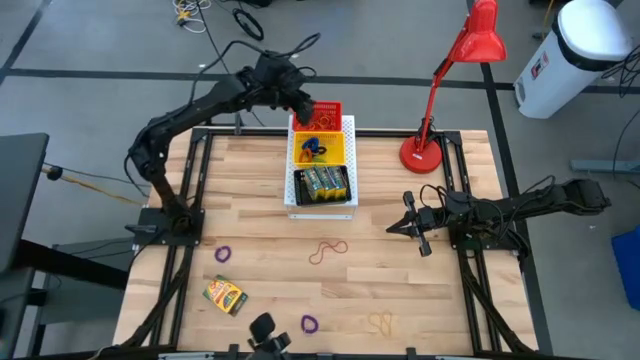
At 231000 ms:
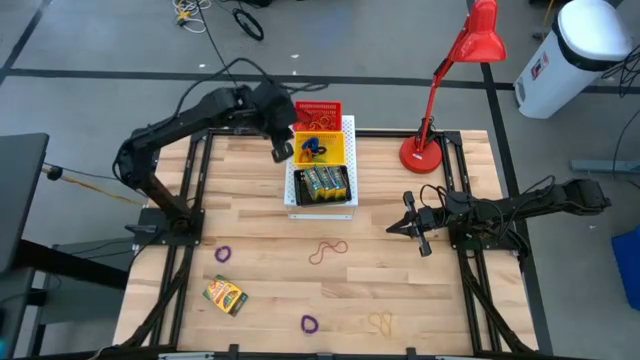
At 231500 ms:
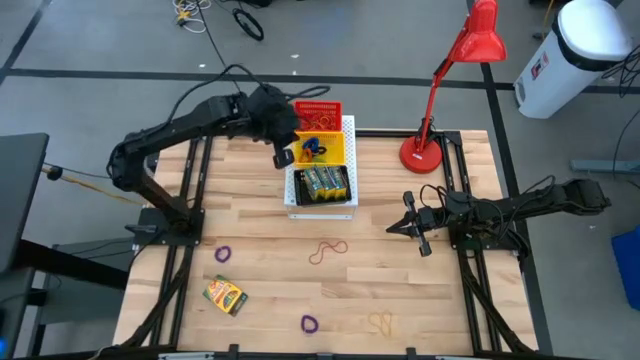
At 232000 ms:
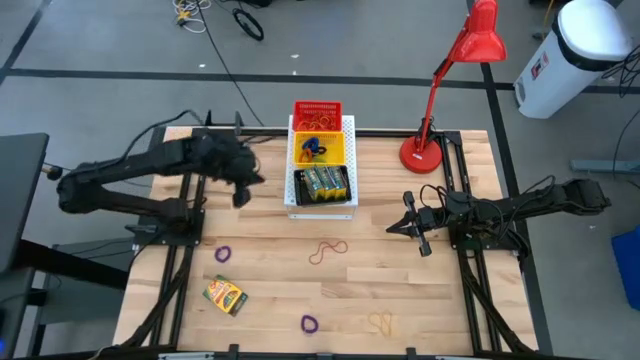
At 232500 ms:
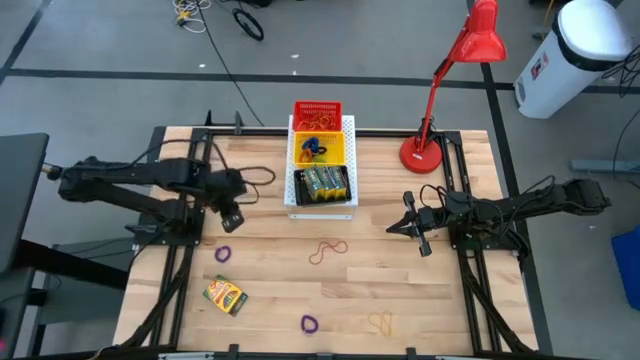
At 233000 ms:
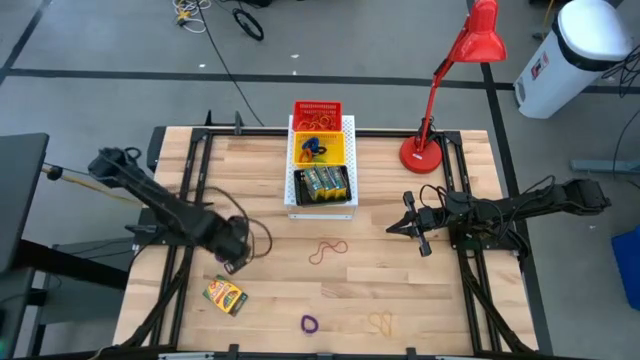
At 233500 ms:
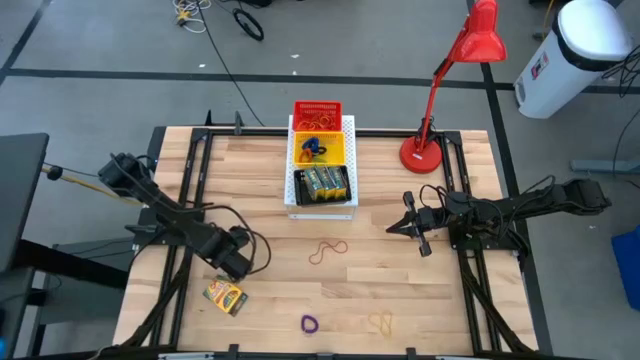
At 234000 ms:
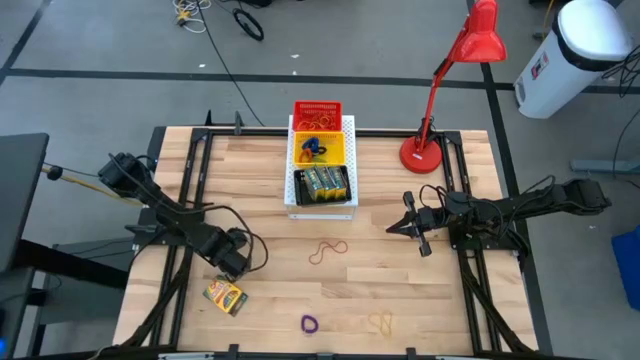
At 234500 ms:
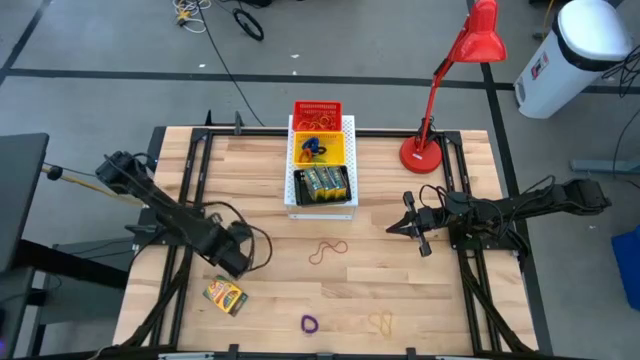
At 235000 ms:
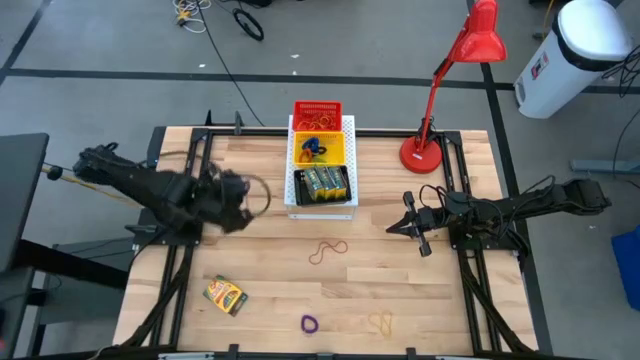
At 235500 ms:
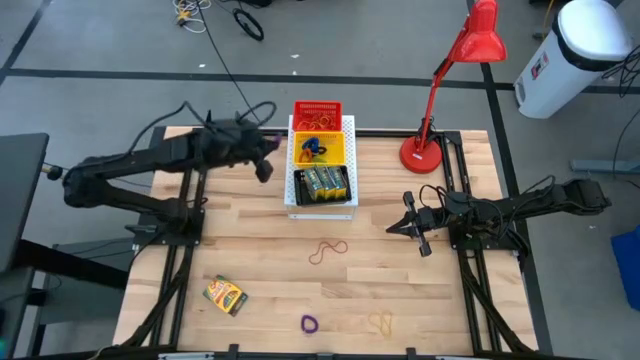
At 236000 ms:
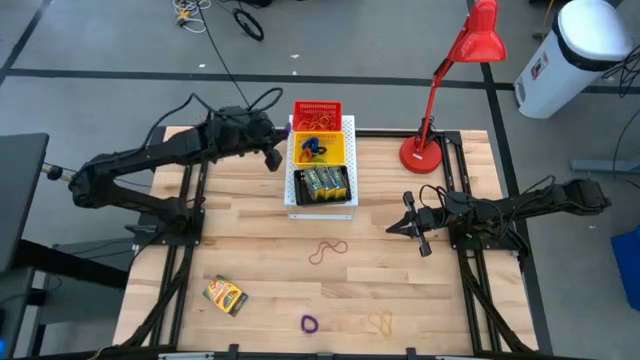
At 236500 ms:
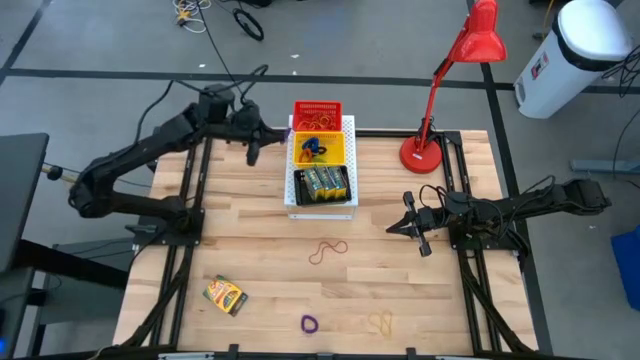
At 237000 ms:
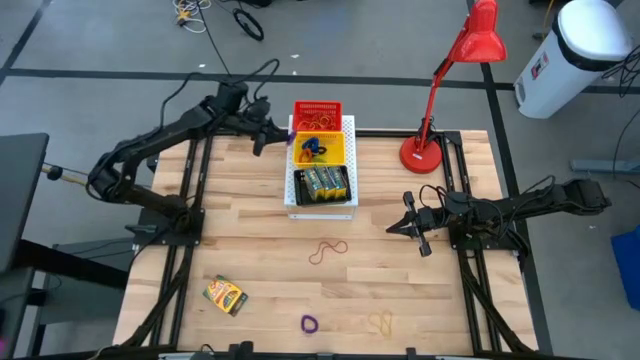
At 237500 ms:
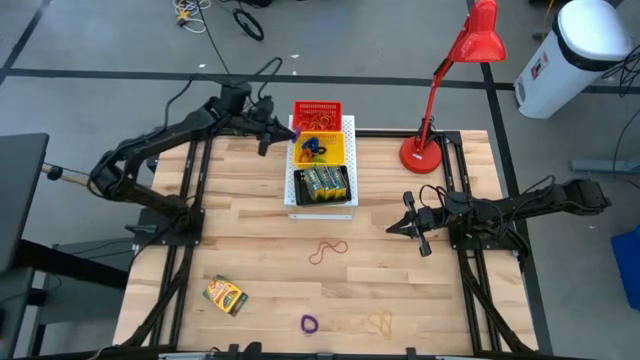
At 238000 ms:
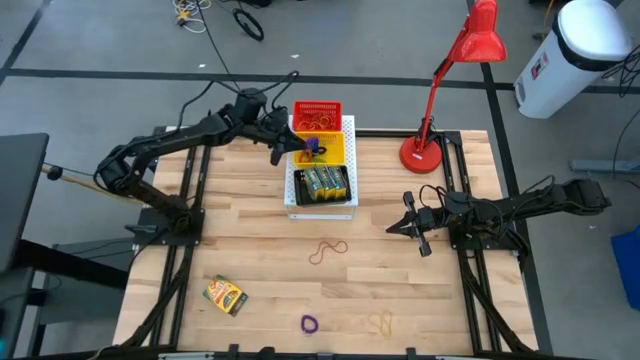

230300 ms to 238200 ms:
Task: Pick & Place Office Desk Supplies
Put the voilet spring keychain into the yellow bin on the shelf

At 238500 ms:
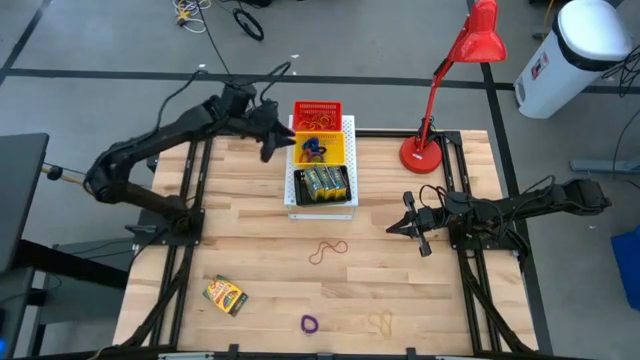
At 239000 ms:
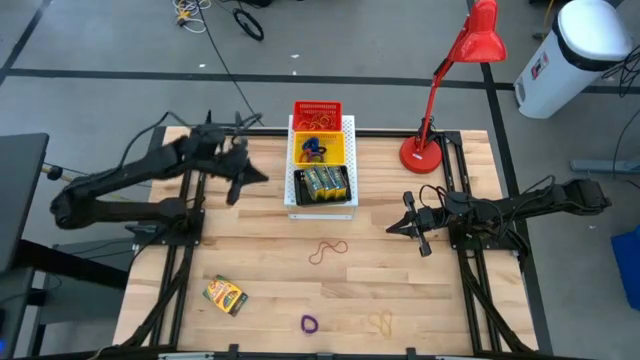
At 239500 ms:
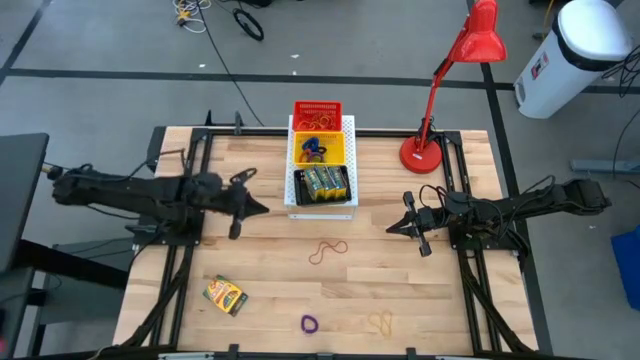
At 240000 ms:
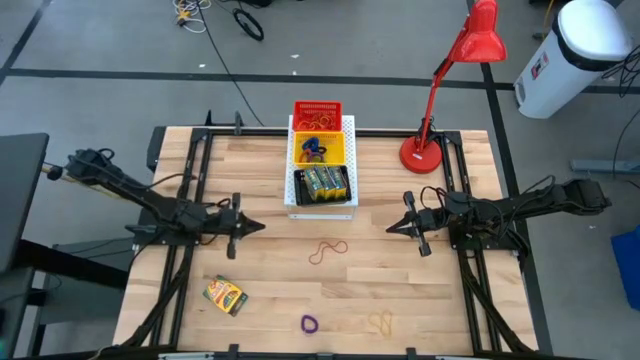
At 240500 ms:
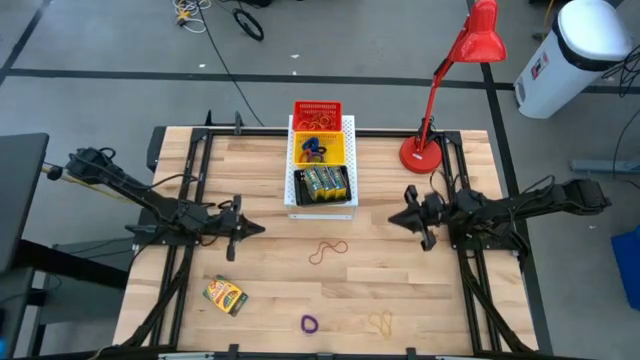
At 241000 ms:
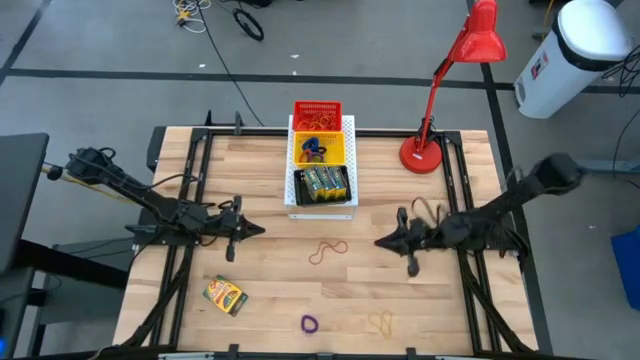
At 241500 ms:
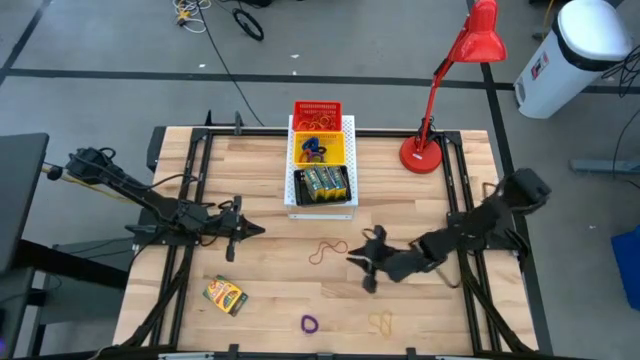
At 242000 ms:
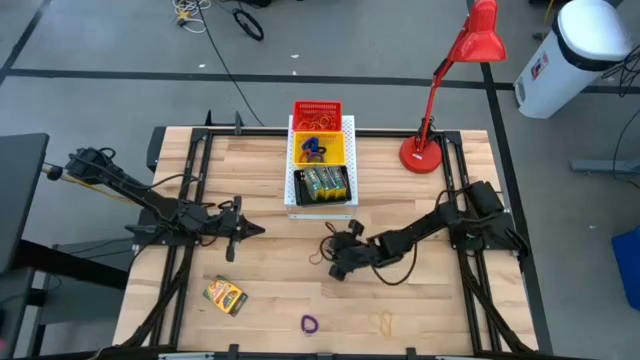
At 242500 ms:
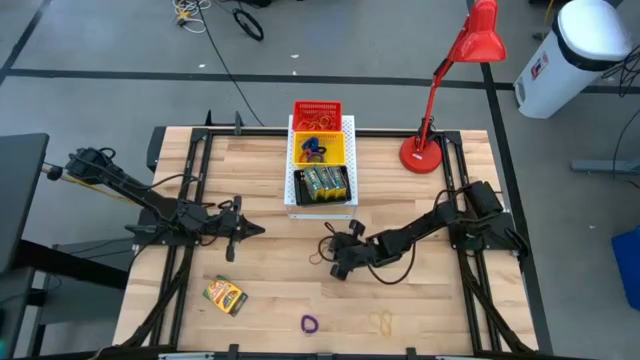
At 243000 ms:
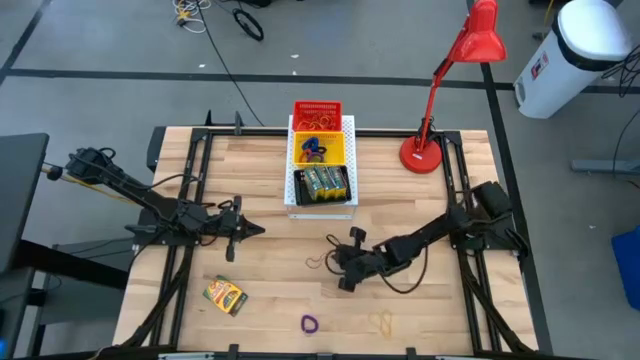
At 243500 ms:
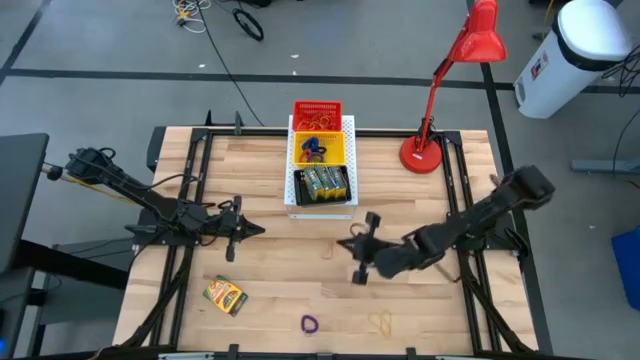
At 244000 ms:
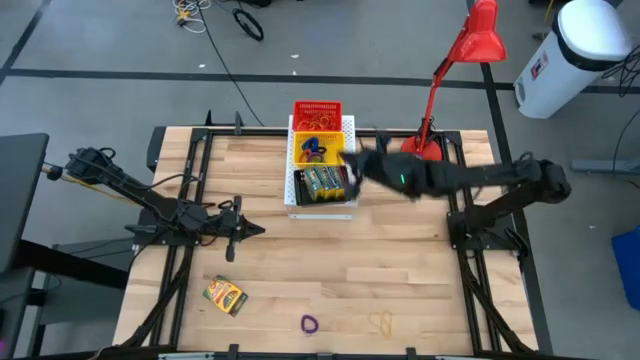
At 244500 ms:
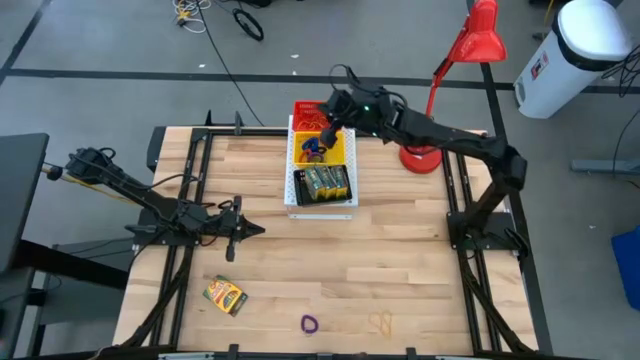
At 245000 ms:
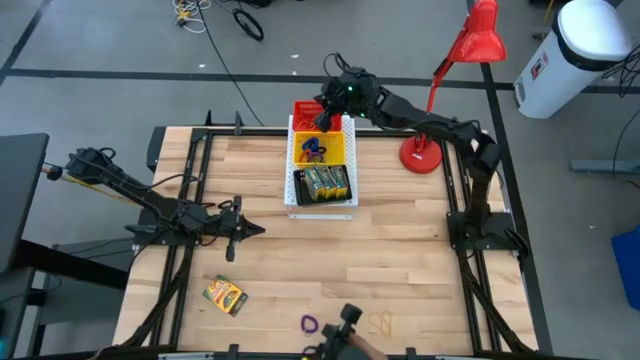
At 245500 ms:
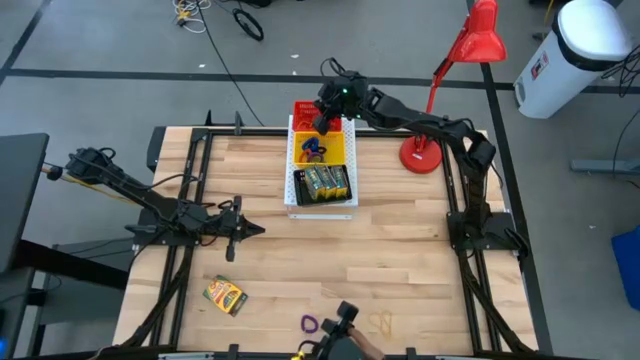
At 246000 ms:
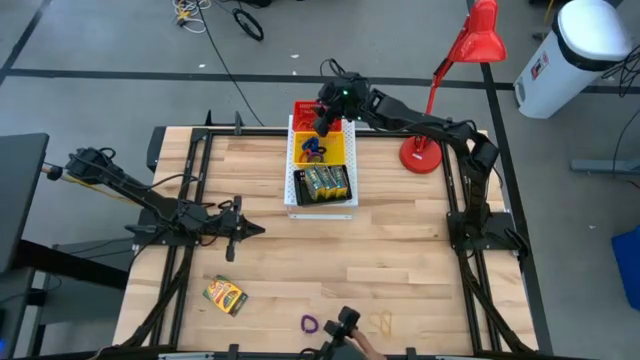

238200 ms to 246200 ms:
Put the red rubber band into the red bin on the shelf

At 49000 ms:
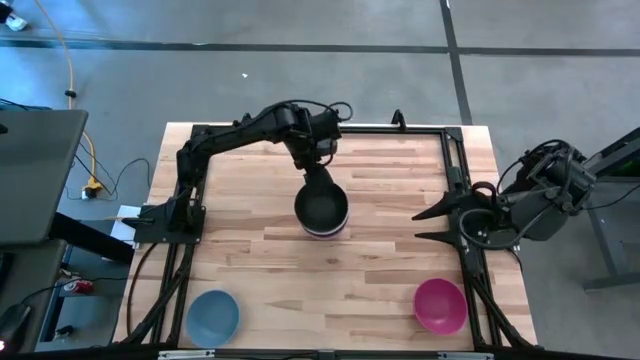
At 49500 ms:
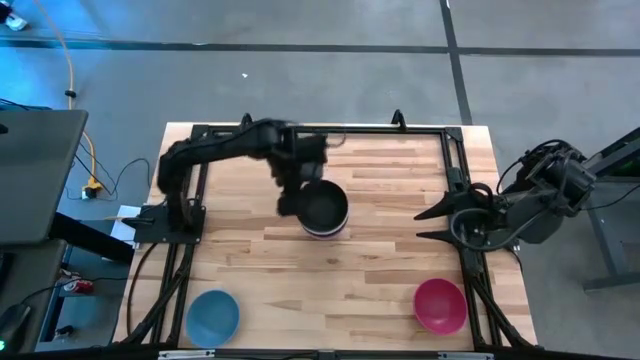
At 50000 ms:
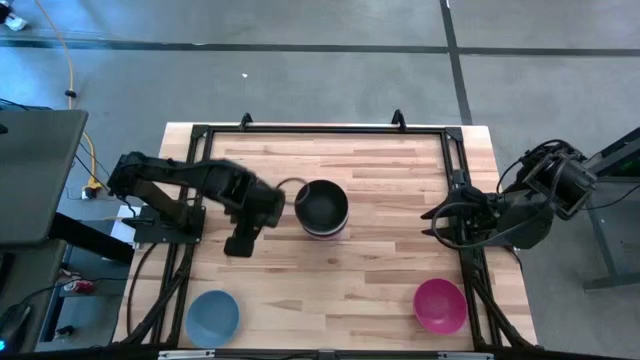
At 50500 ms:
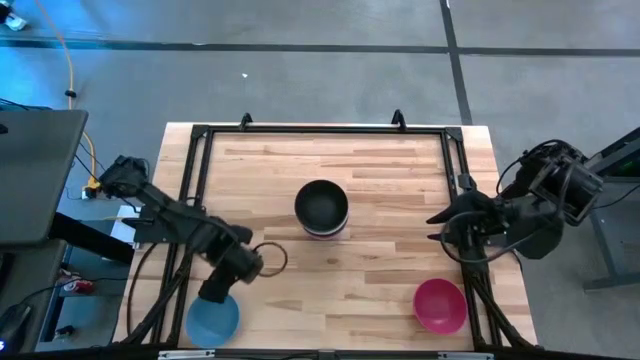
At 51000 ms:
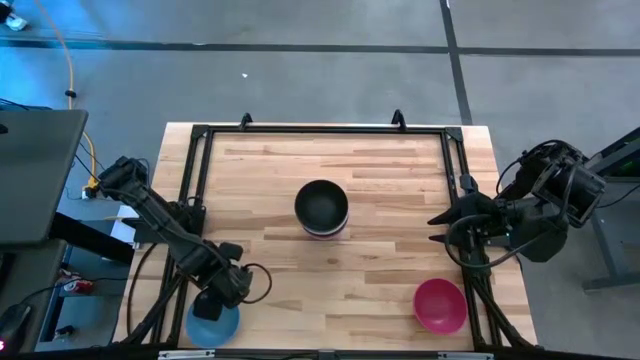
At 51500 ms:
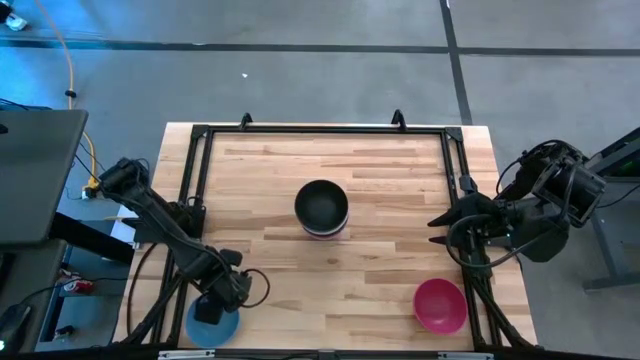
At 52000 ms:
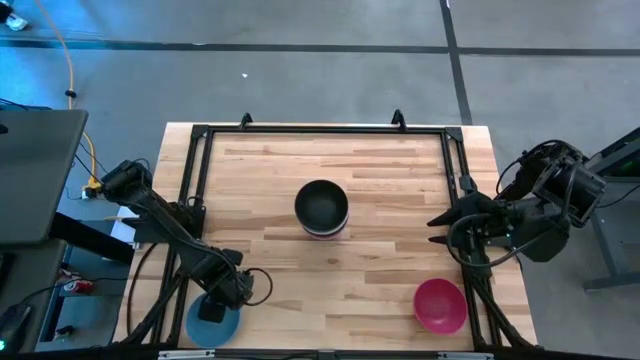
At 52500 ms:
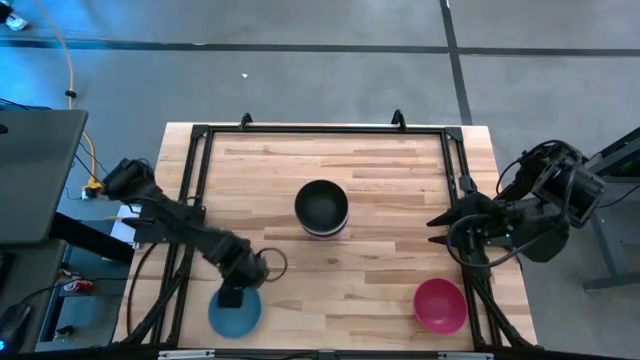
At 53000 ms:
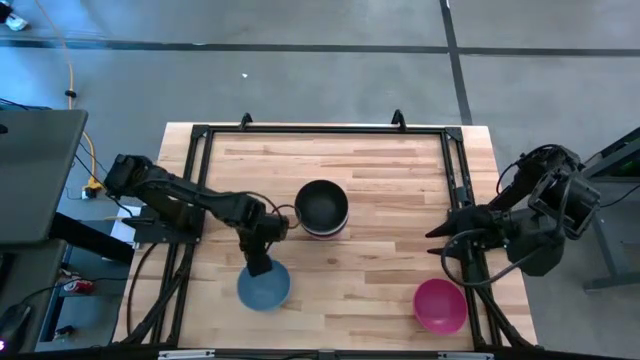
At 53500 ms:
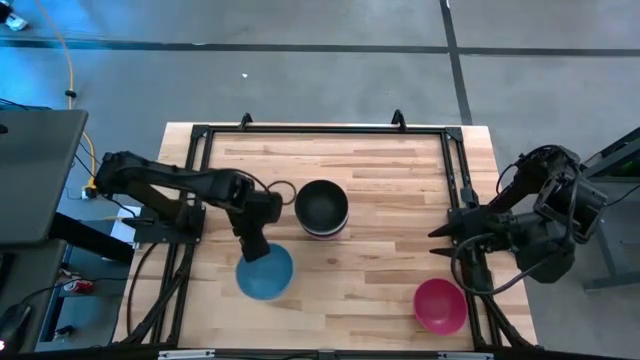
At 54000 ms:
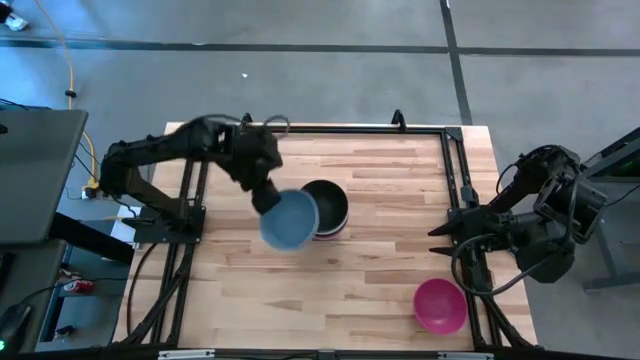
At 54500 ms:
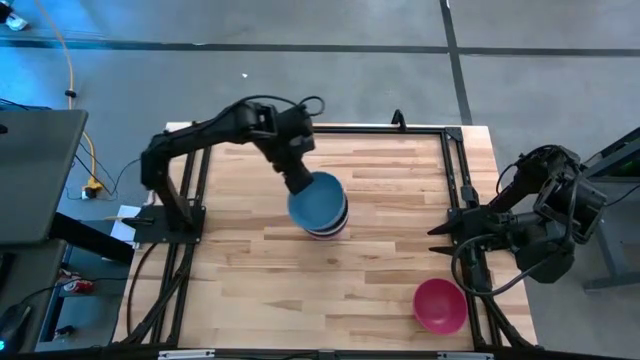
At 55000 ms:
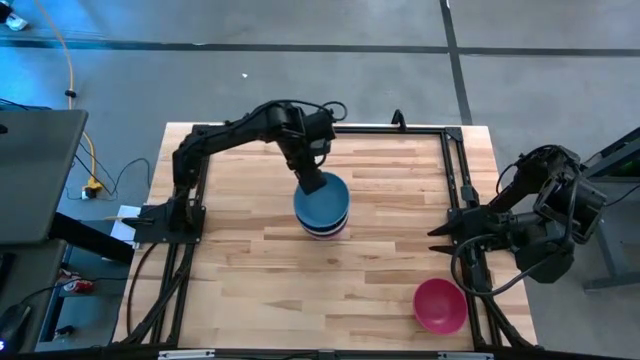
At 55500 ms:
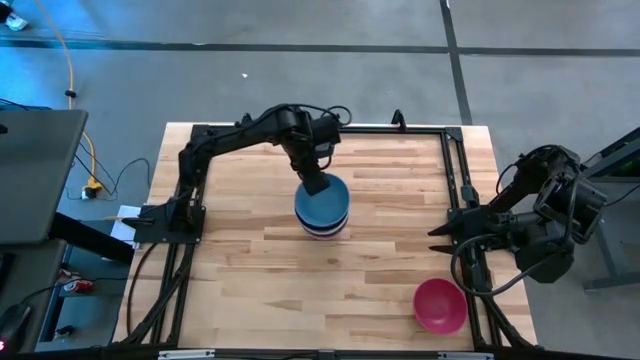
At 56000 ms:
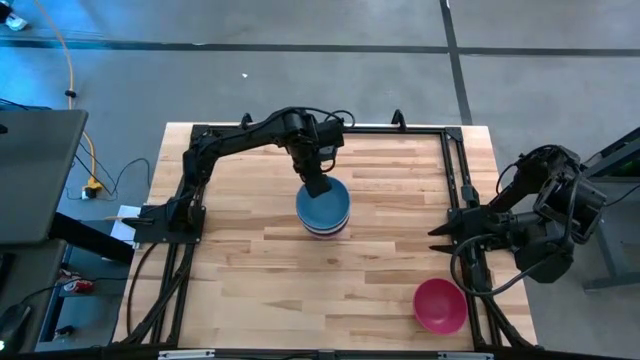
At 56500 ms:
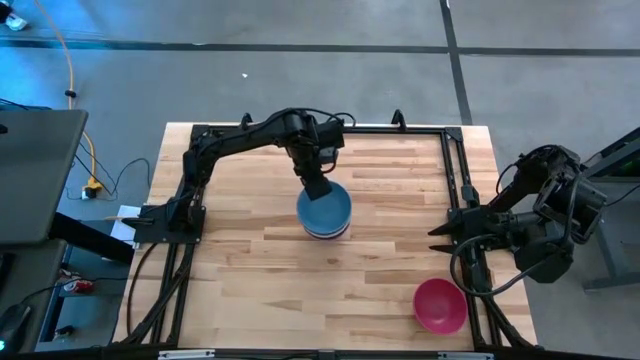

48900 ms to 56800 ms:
Task: Nest bowls inside each other
Stack the blue bowl on top of the black bowl
